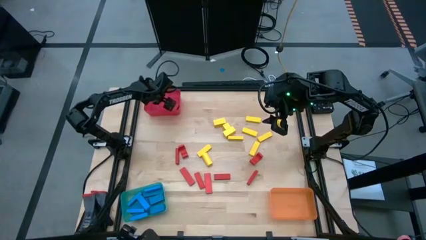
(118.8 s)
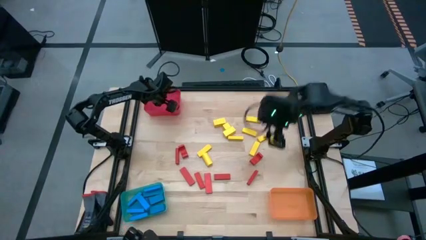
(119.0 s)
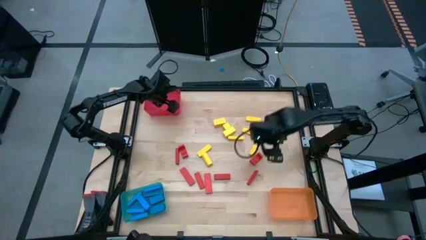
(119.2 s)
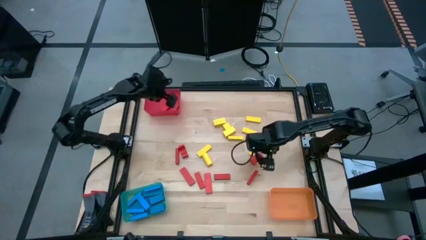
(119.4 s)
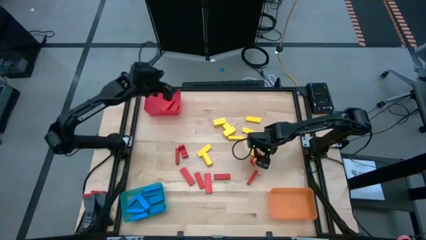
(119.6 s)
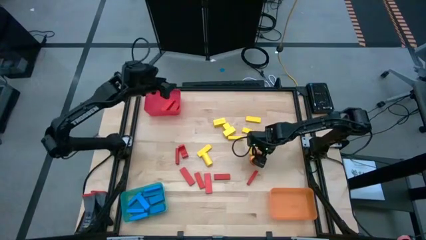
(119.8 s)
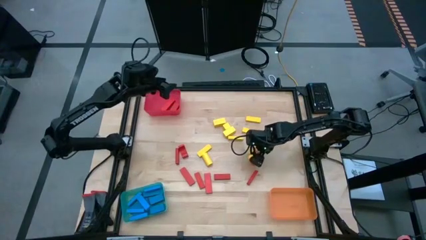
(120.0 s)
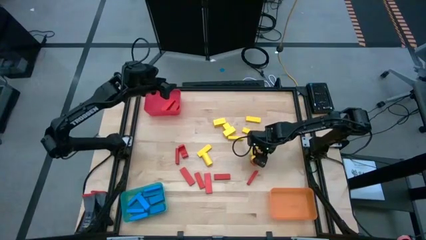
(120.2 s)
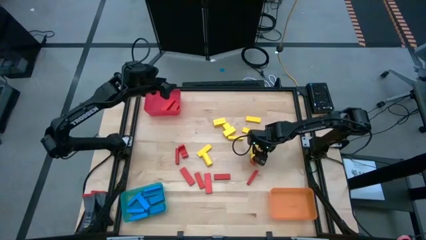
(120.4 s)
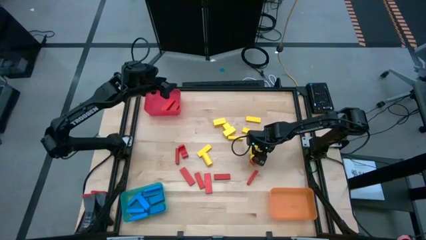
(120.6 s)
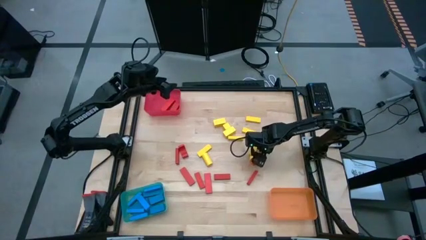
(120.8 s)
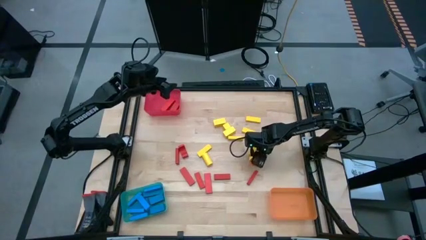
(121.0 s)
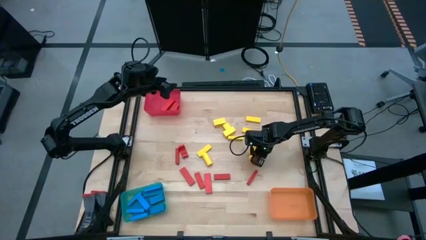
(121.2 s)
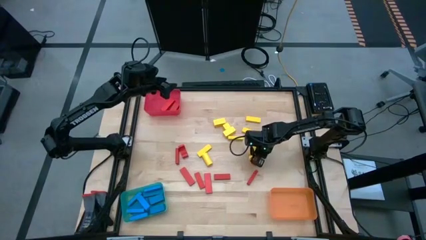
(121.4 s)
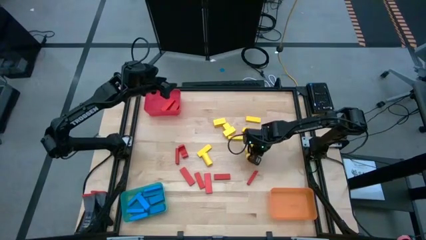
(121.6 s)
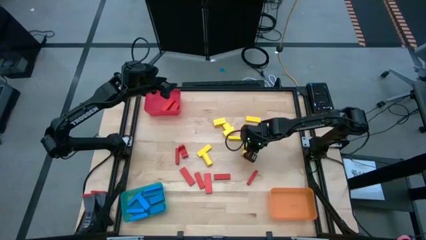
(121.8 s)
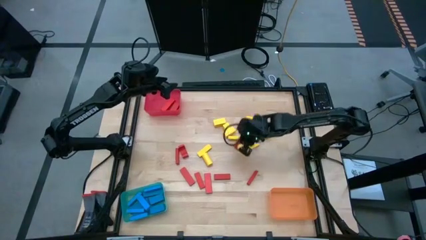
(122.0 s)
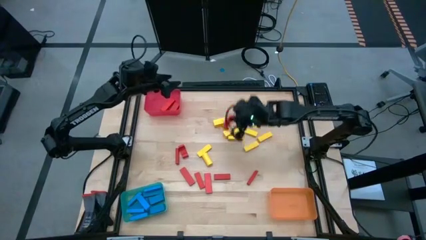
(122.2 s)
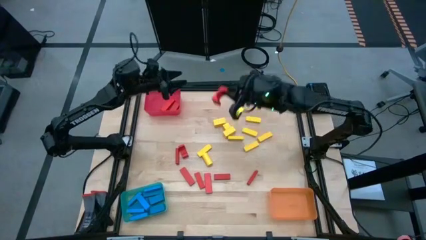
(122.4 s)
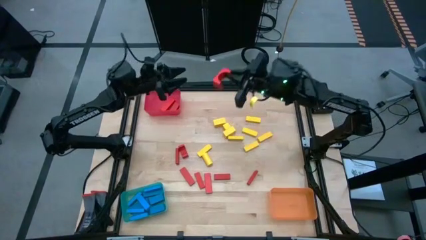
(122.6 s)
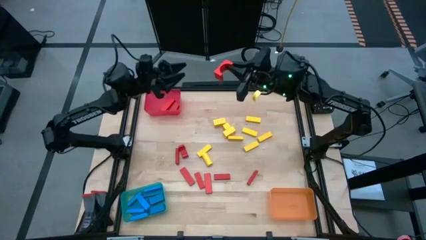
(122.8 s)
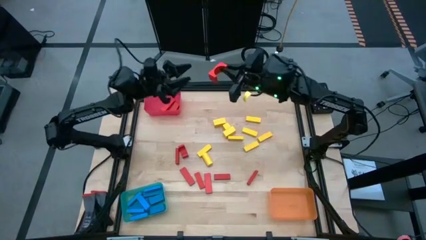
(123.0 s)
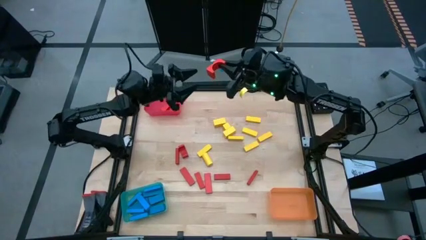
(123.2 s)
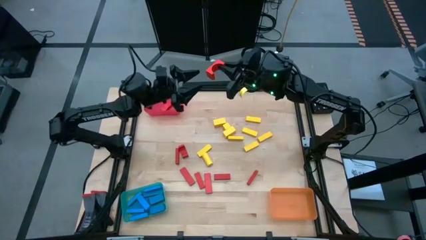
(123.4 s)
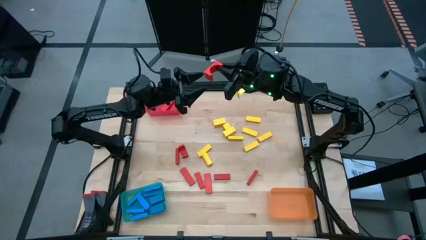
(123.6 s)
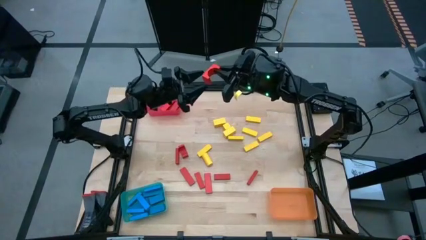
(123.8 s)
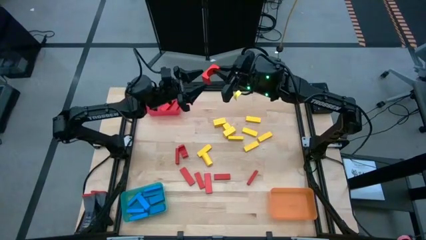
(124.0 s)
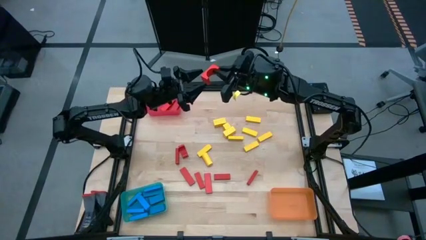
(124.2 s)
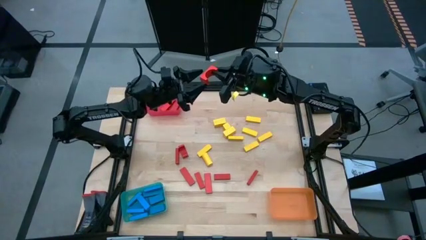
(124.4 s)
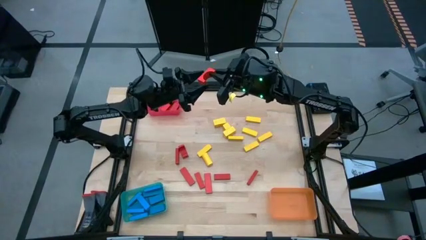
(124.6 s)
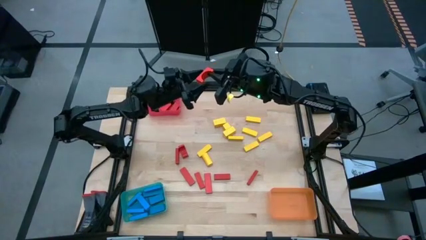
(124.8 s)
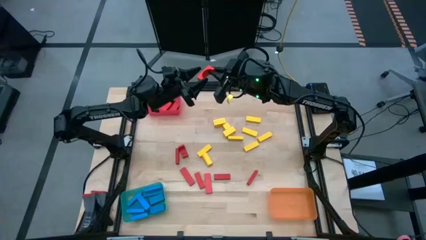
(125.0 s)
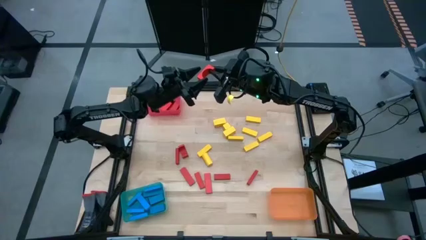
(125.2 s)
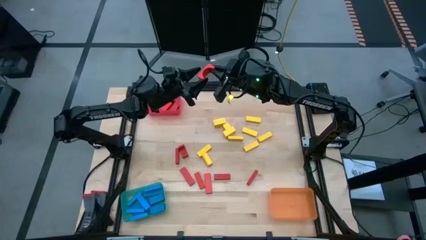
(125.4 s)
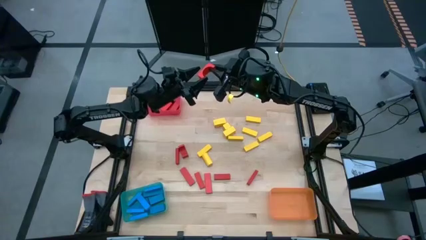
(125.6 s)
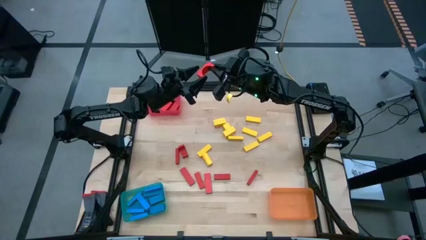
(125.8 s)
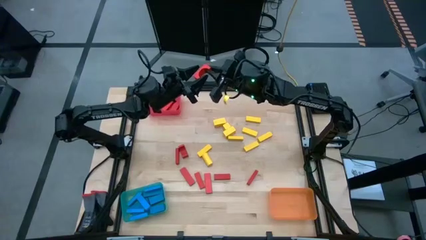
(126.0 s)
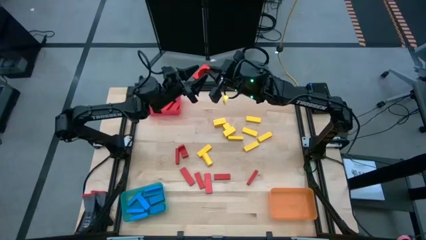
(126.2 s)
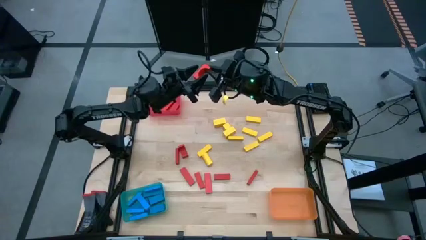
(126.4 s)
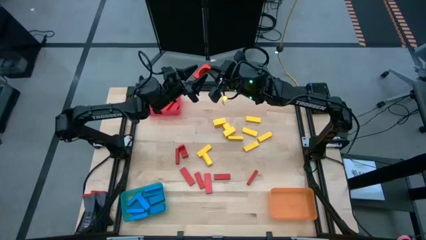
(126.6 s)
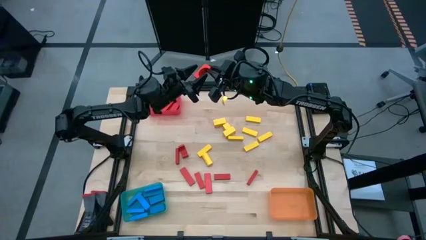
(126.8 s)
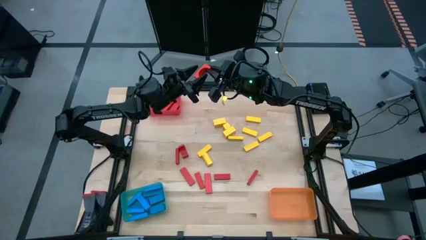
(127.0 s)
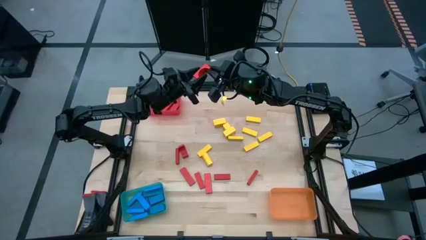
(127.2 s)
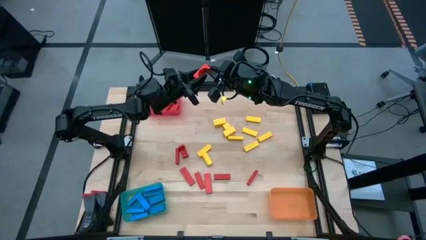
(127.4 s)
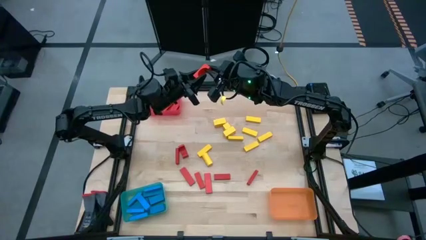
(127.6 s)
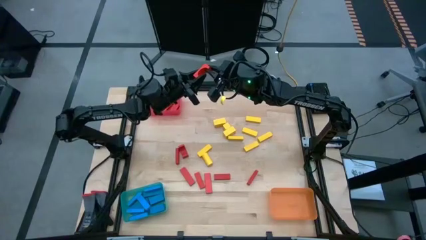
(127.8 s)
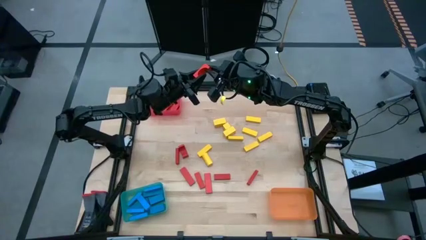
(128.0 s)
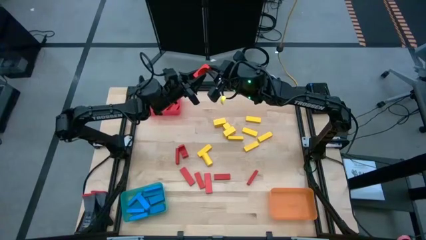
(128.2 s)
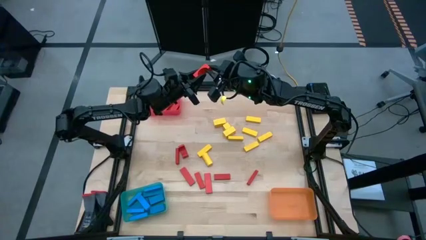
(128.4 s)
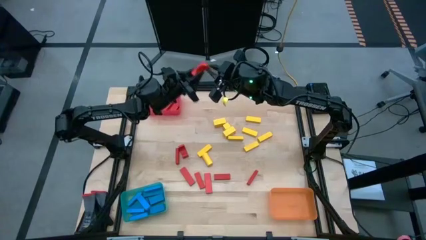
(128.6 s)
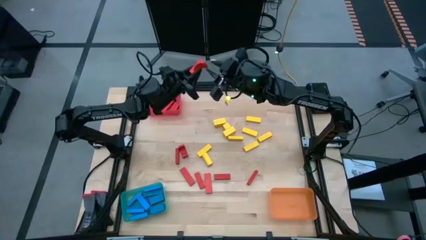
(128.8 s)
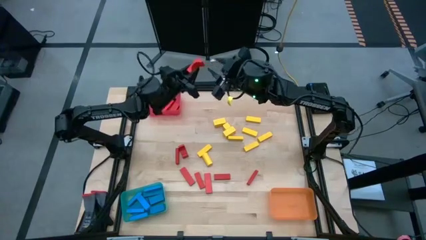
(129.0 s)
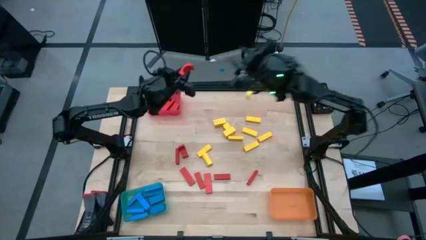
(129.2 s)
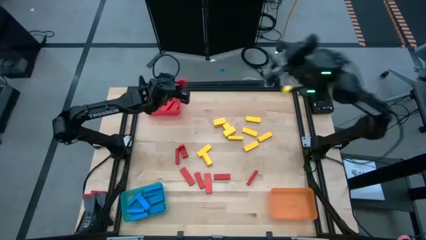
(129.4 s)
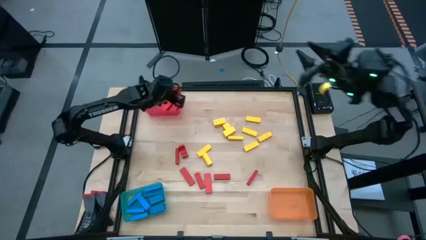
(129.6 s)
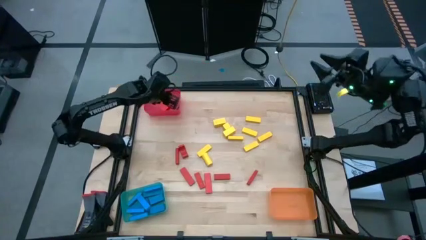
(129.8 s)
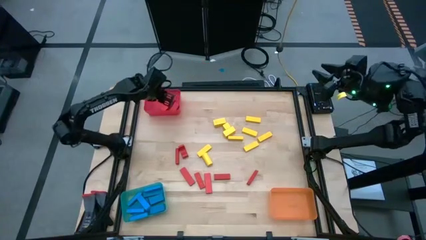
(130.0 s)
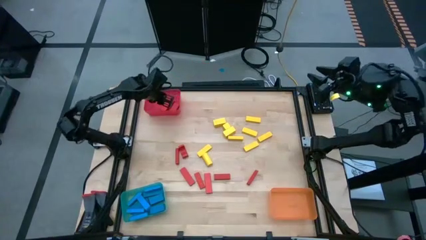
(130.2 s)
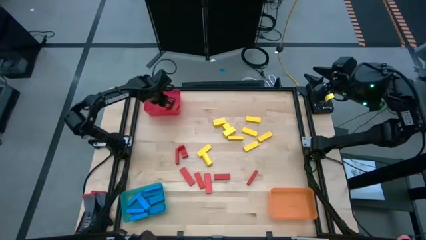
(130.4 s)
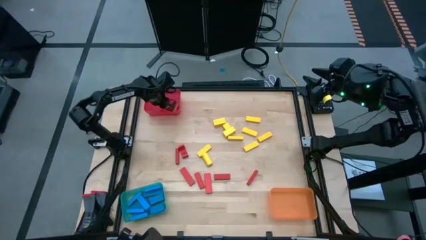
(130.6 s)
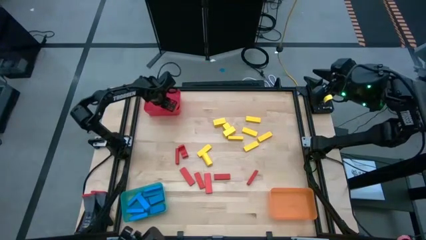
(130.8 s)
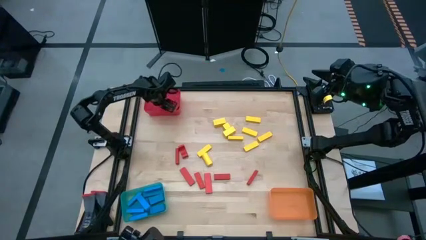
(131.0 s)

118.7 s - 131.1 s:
Task: Sort blocks
Put the red block into the red bin

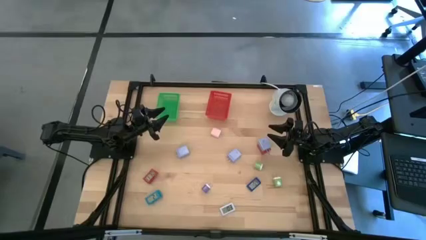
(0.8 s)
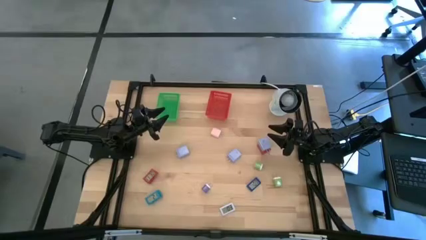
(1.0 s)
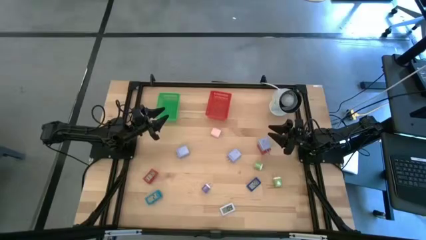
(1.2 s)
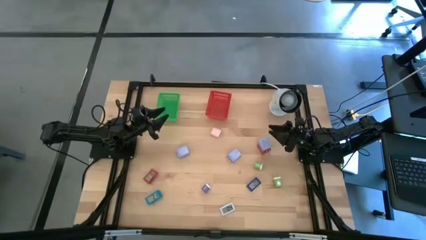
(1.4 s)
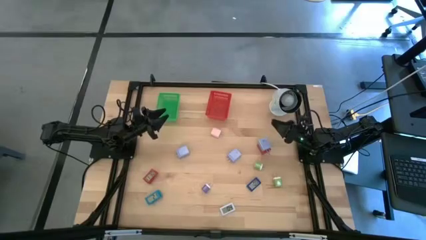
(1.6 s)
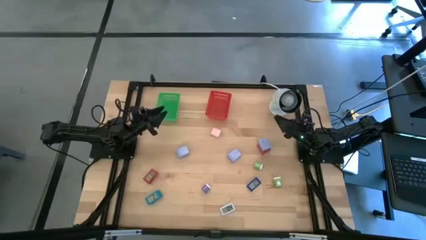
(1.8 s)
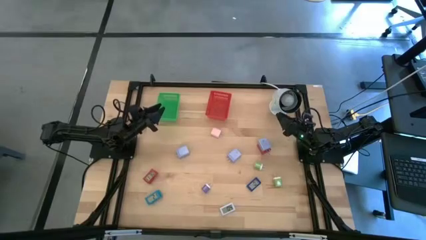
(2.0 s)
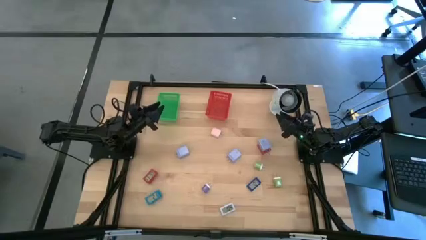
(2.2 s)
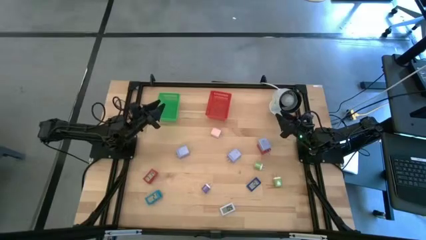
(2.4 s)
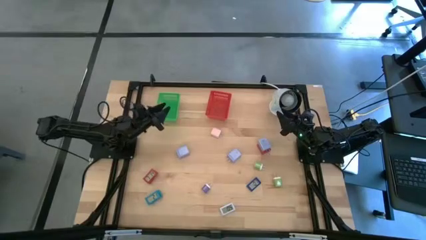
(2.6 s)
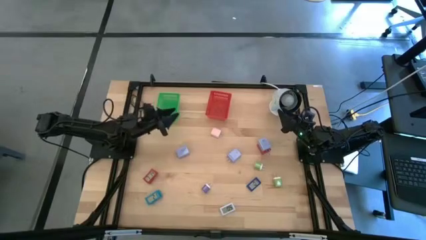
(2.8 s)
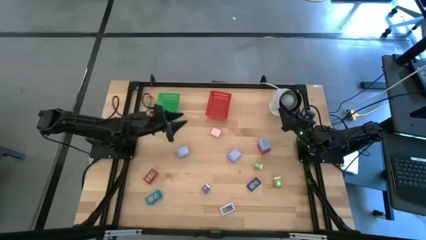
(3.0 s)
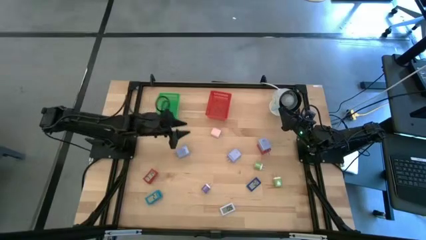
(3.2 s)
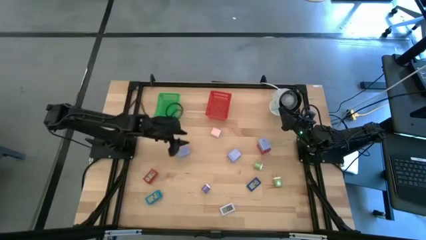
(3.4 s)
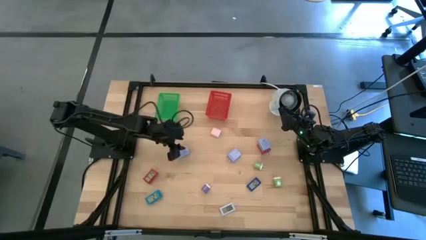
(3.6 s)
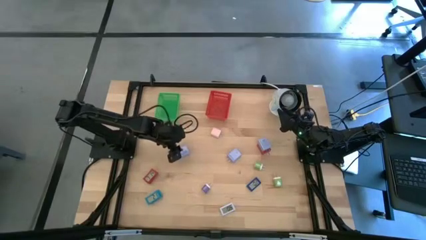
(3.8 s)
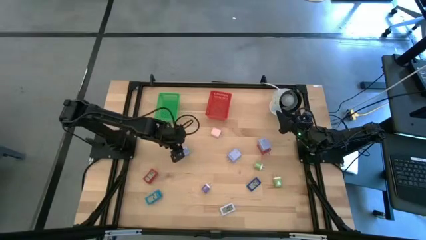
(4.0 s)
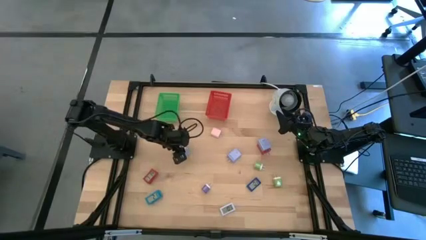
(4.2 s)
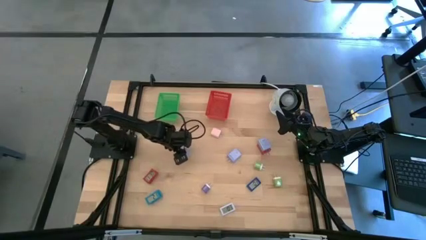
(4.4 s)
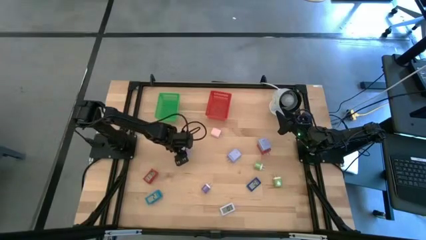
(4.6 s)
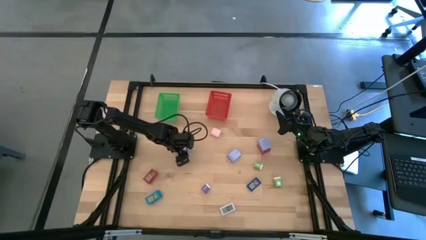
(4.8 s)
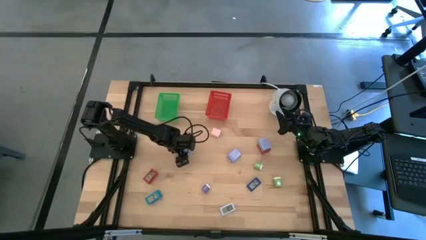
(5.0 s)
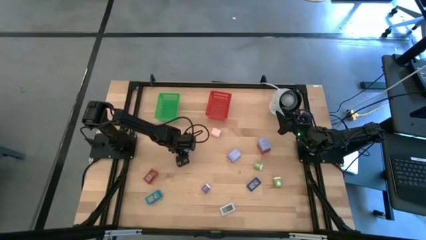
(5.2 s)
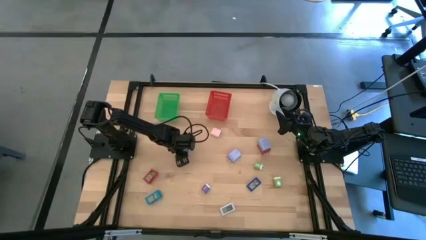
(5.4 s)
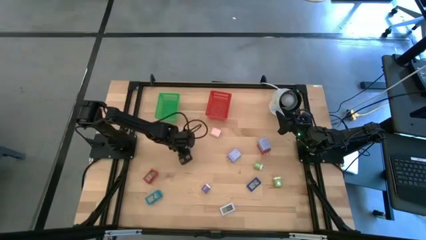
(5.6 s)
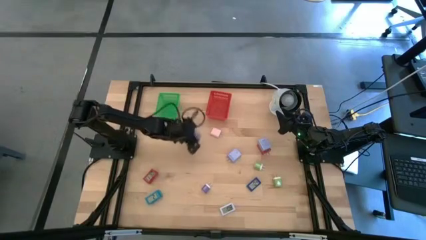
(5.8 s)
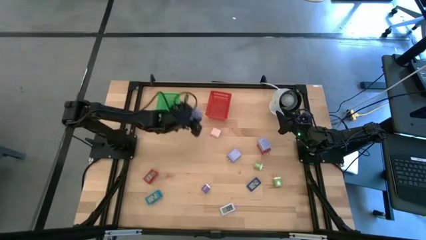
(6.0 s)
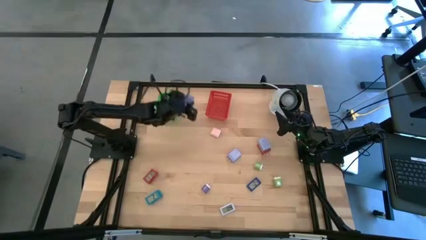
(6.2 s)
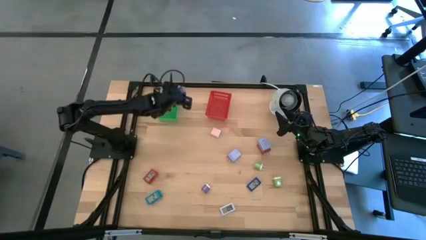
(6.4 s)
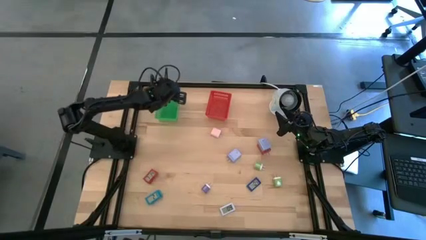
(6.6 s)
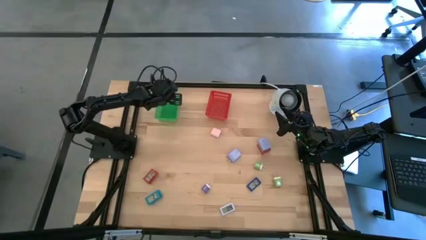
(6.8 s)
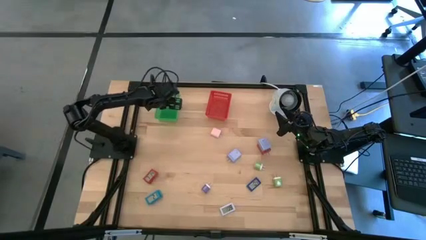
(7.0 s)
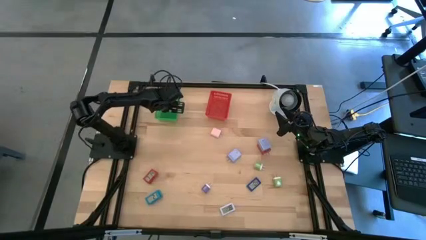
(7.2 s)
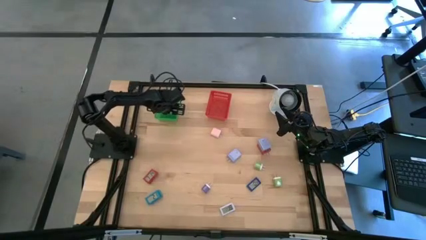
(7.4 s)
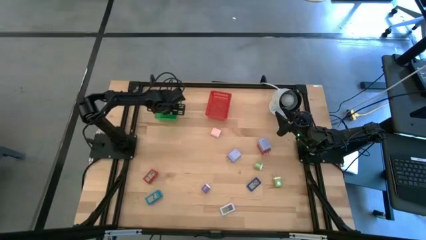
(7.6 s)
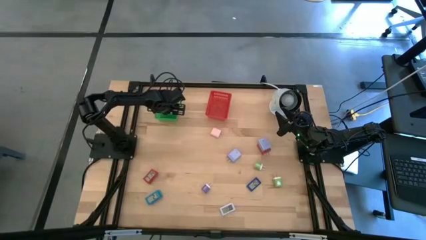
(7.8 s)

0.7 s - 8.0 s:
Task: Pick & Place Office items
Put the left light blue charger adapter into the green bin
